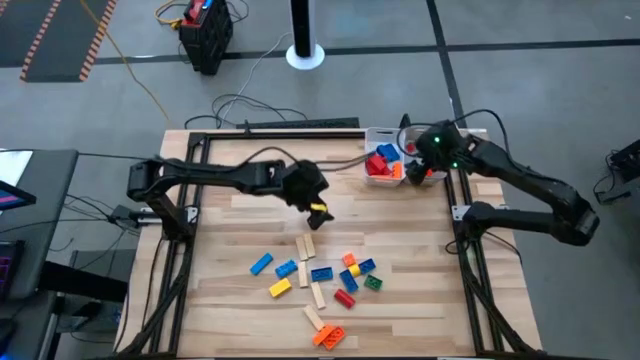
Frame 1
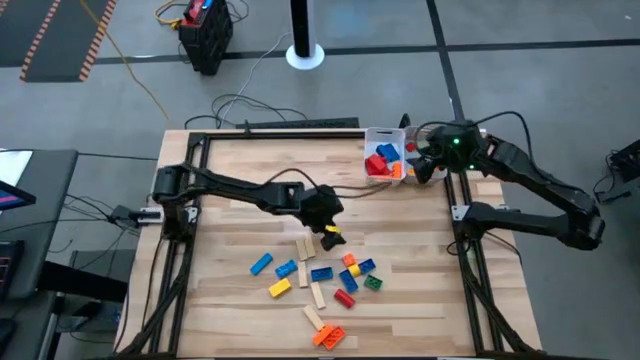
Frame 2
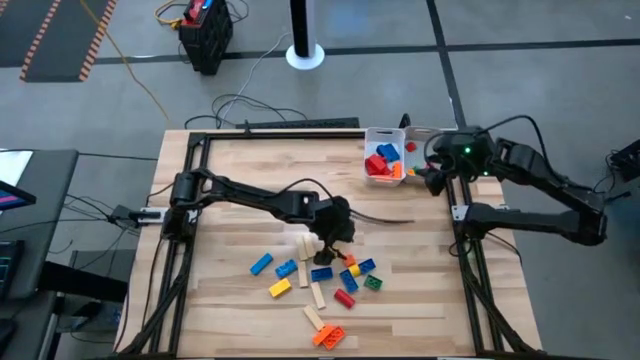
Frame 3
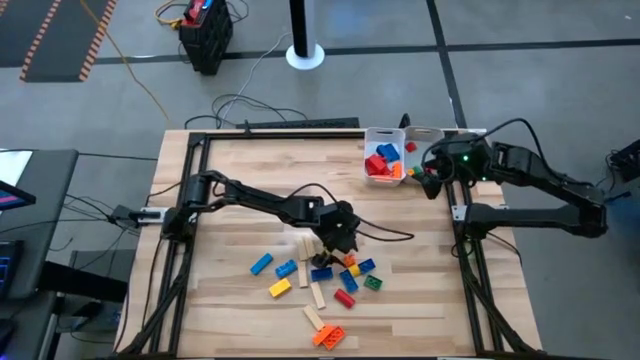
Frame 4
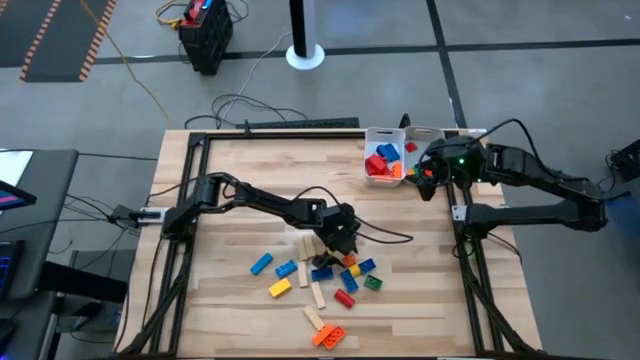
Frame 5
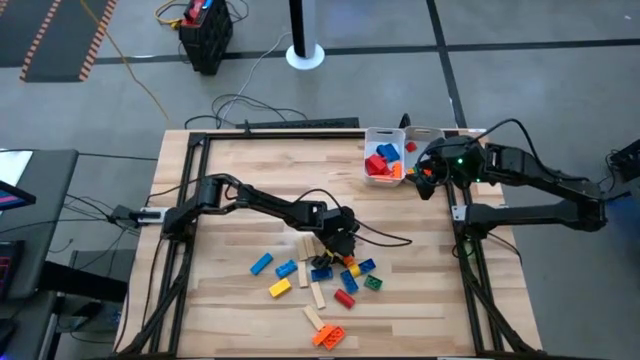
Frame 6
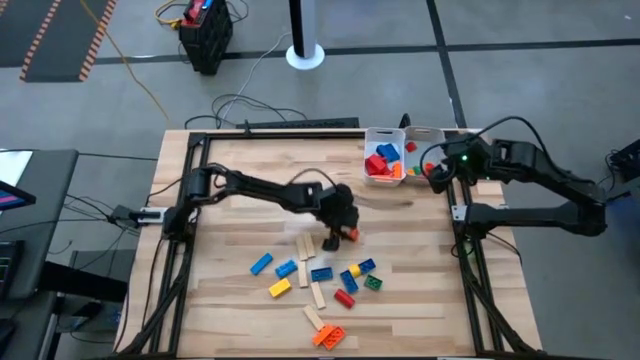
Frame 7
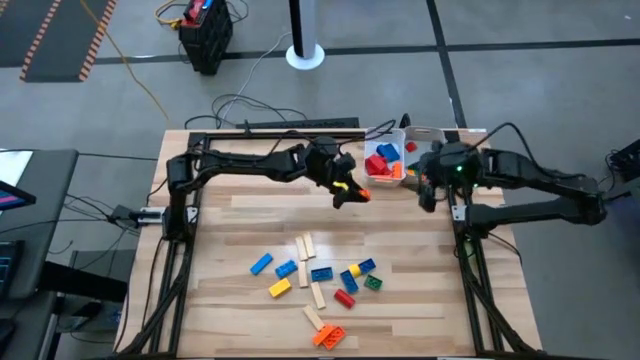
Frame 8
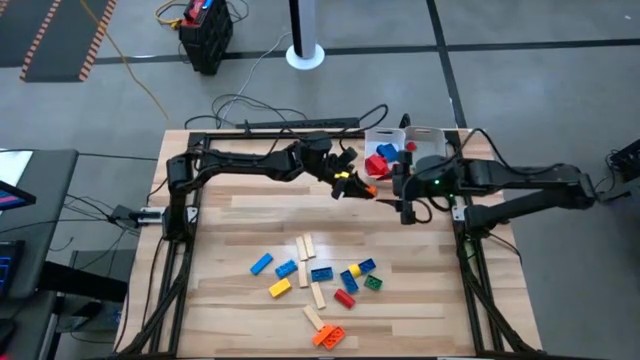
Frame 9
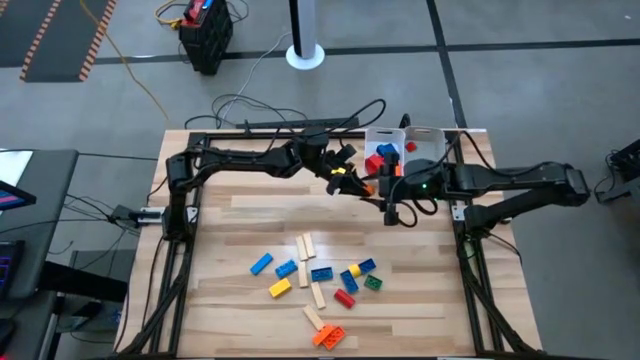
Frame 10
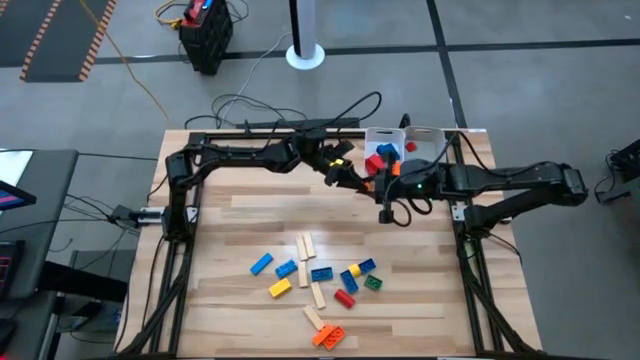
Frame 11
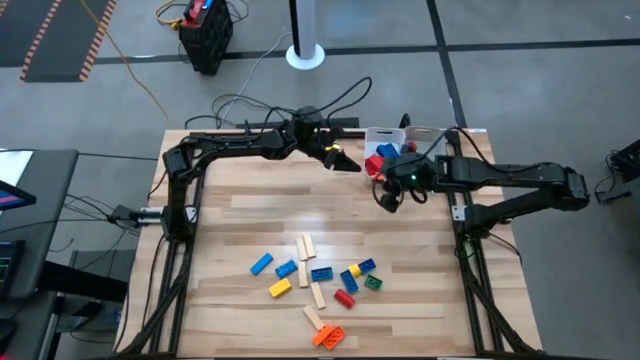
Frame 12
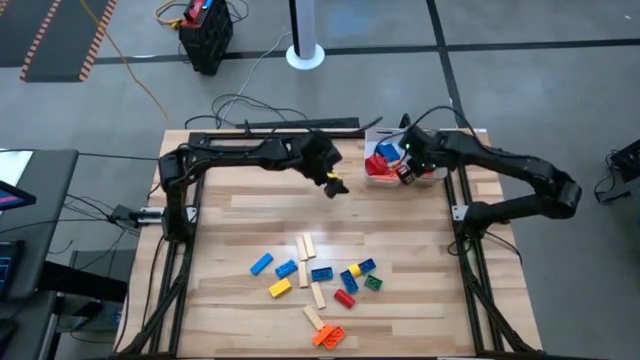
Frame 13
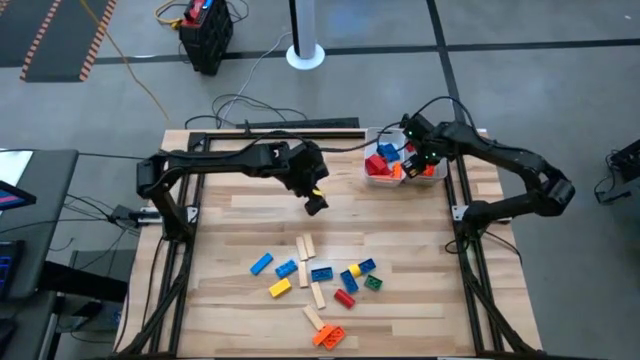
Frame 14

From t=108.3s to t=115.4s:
Task: Sort blocks by size
Put the small orange game piece into the gray bin

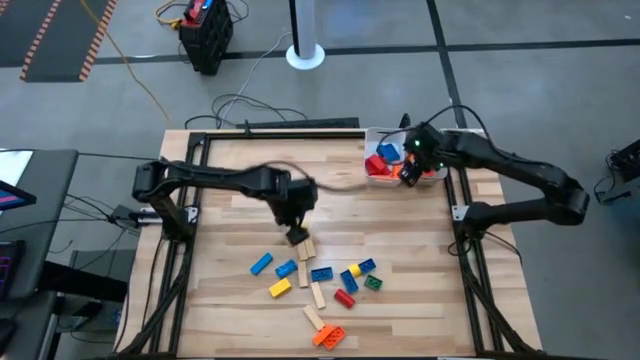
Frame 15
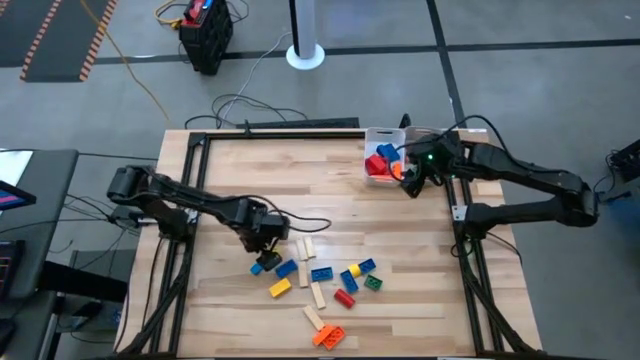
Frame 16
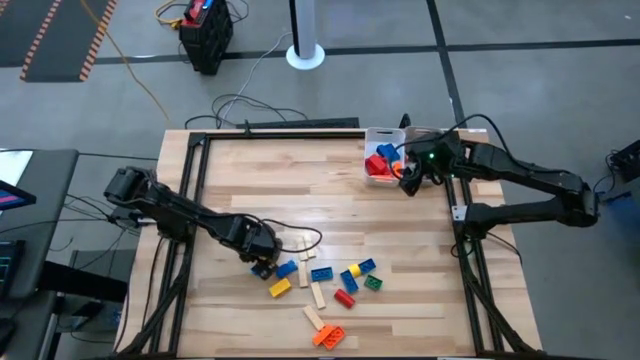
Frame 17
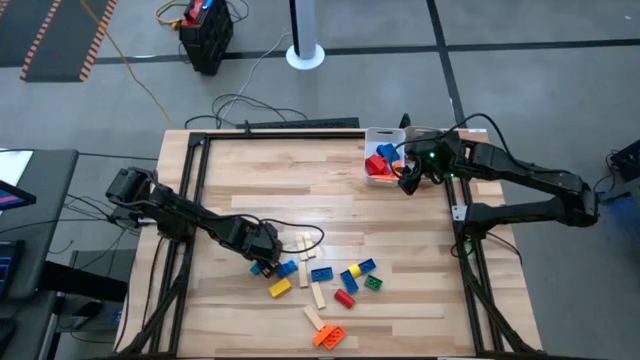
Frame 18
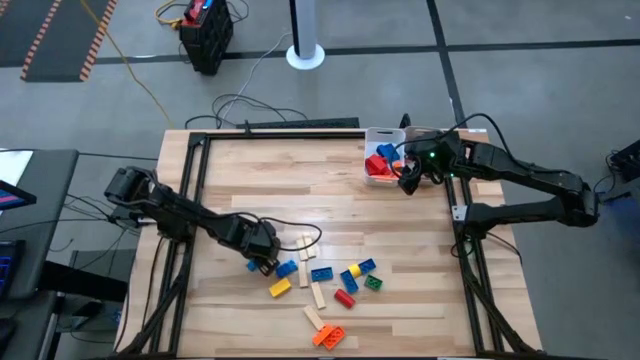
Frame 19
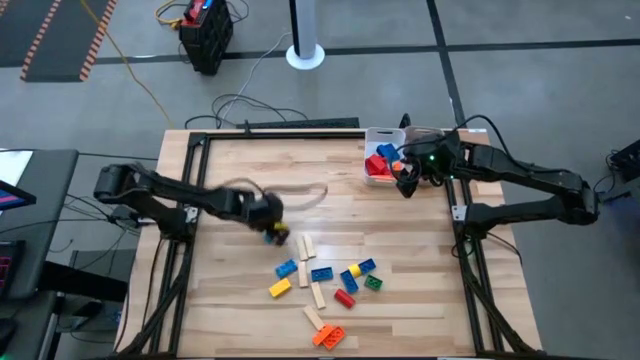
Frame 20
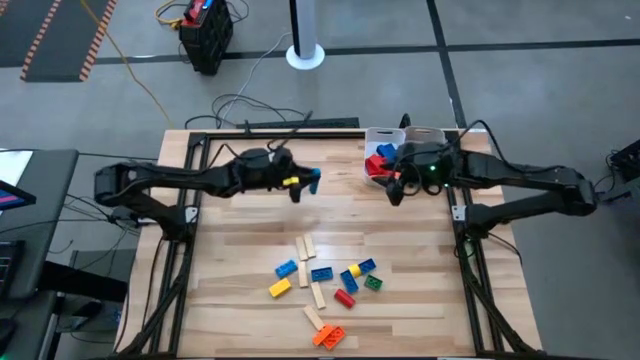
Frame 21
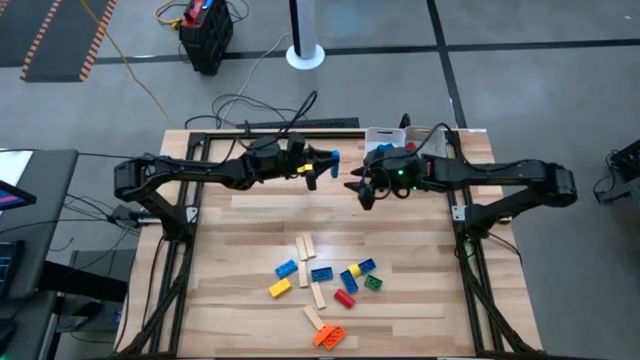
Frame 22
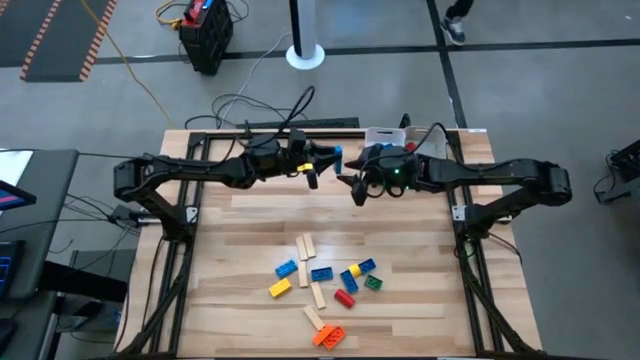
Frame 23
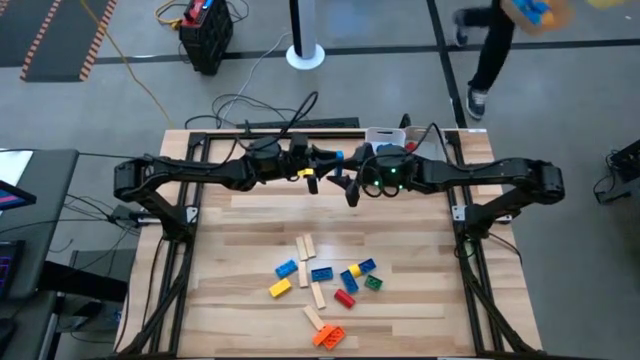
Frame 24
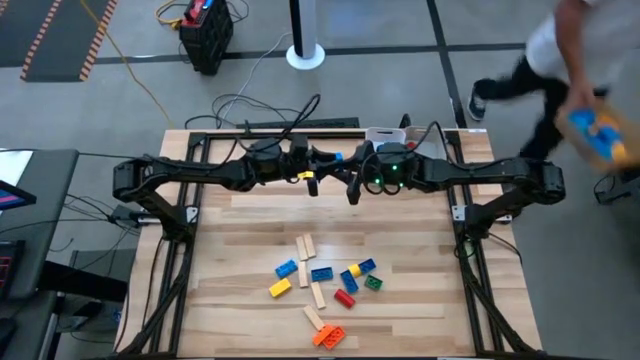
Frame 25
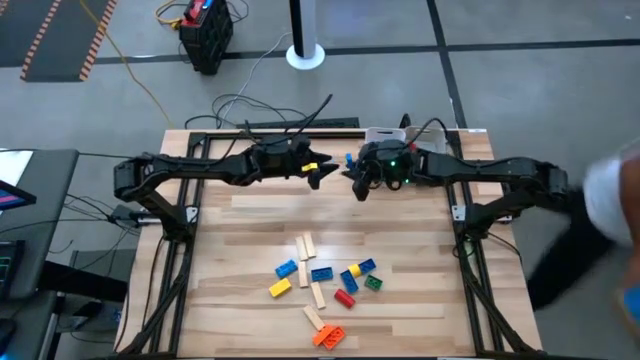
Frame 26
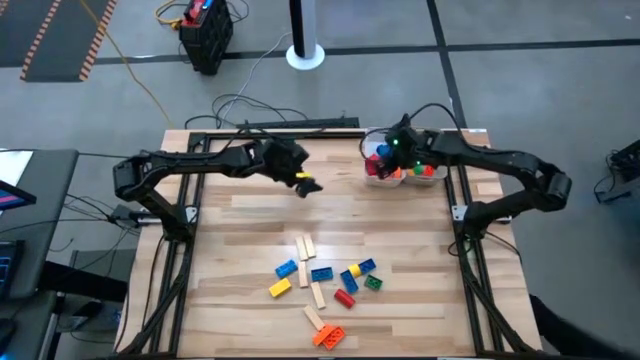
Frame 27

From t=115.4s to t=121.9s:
Put the large blue wooden block into the white bin

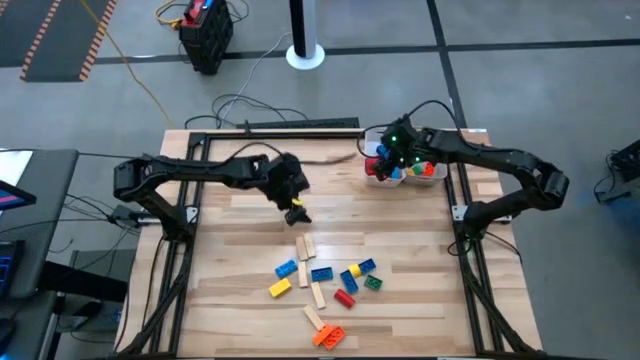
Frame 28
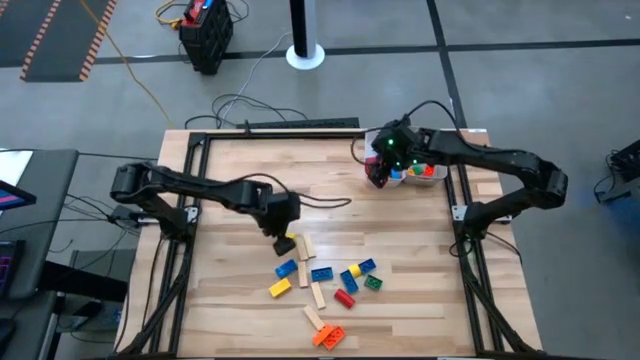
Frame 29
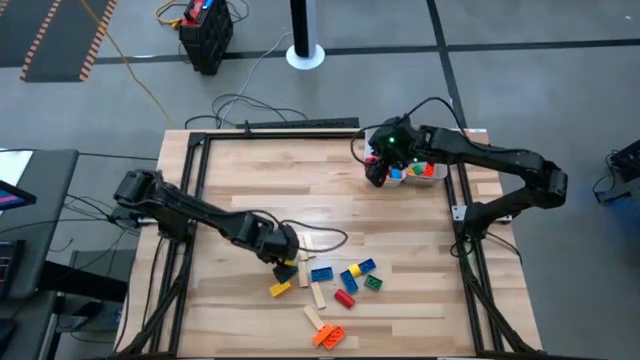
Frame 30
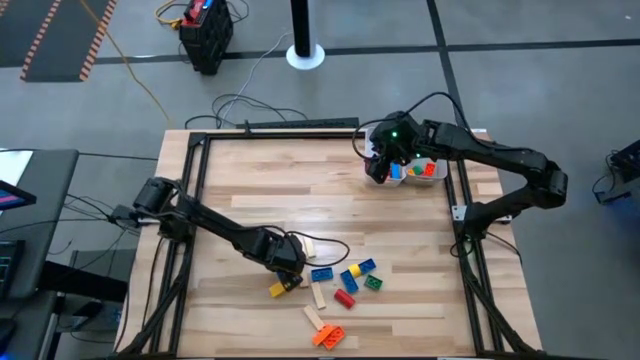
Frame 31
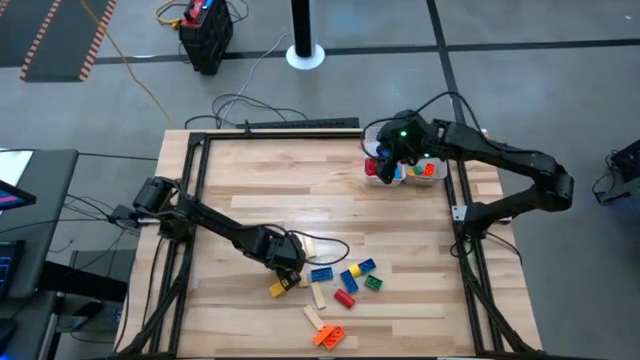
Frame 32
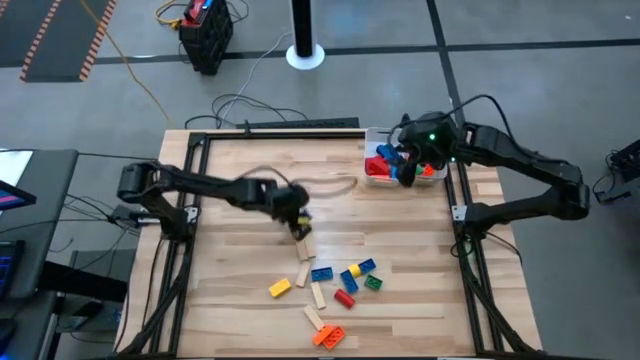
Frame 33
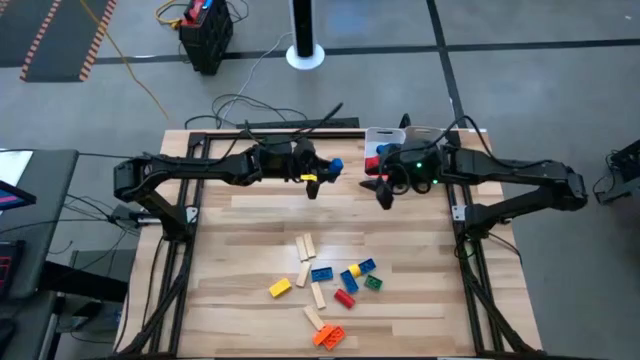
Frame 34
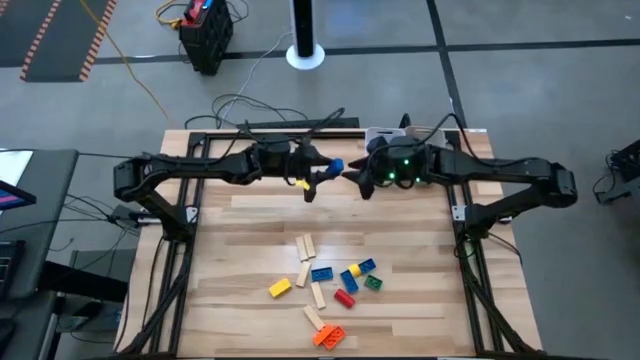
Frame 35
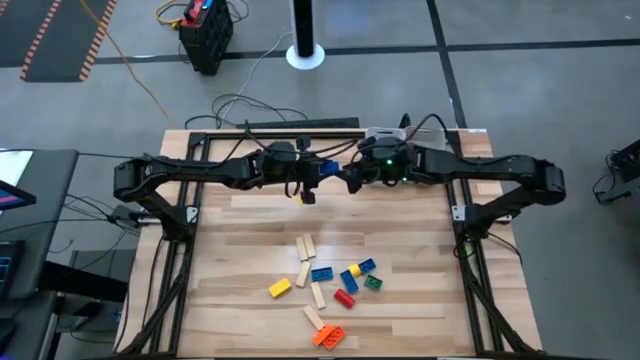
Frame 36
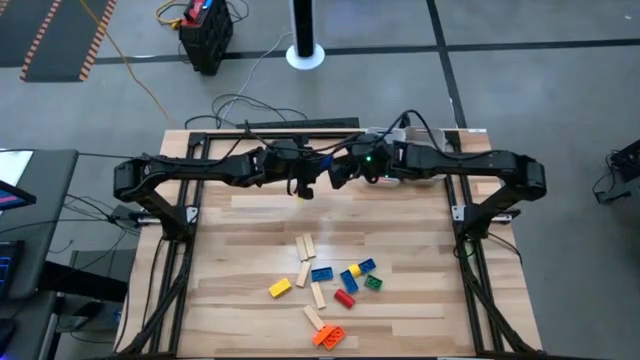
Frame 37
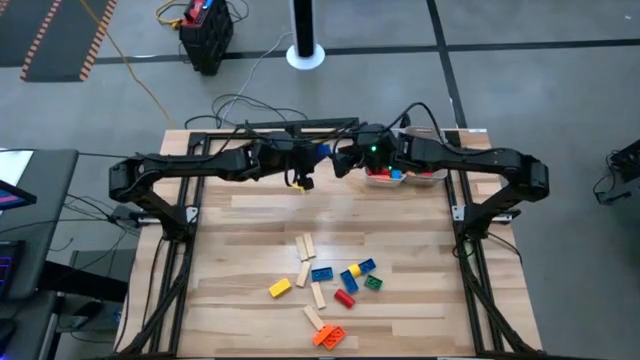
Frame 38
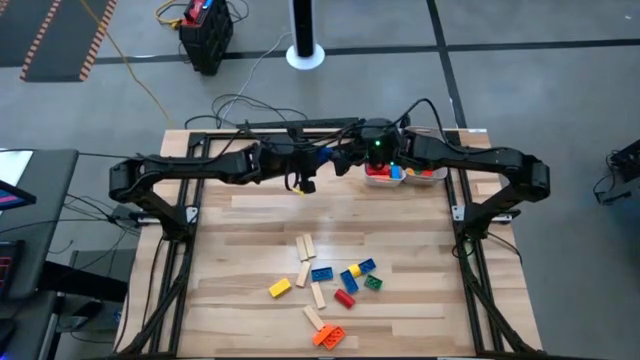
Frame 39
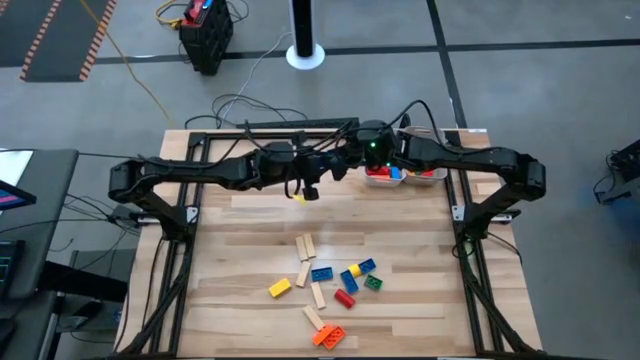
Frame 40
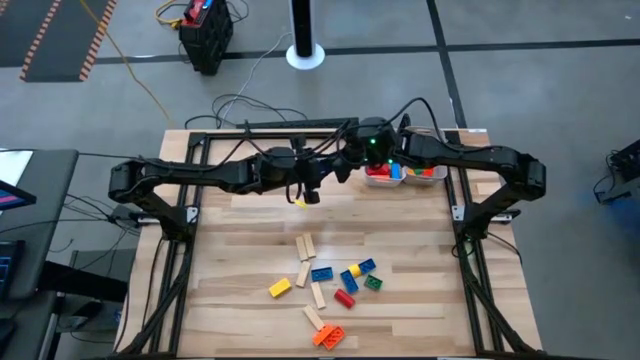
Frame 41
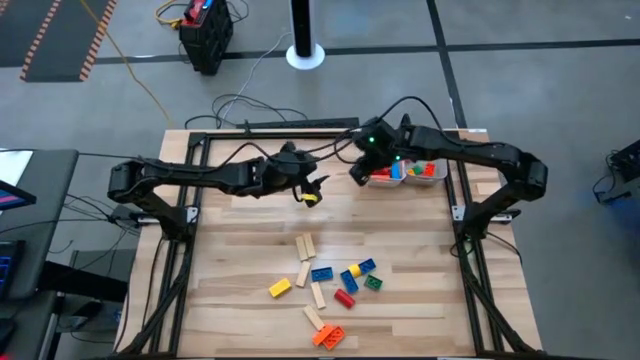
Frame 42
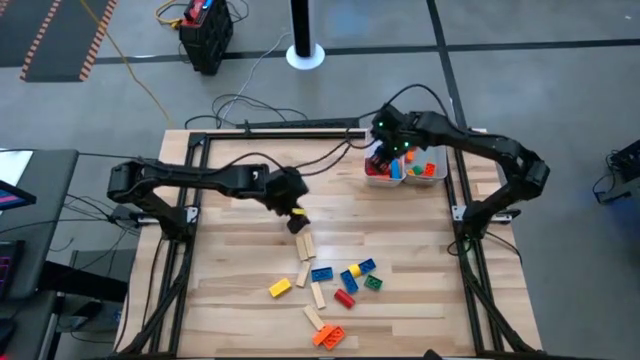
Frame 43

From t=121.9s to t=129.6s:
Put the large blue game piece into the white bin
